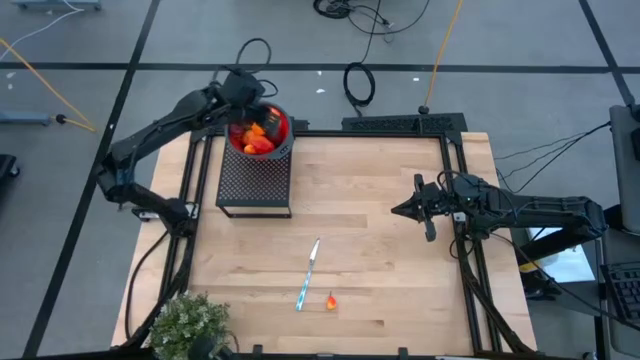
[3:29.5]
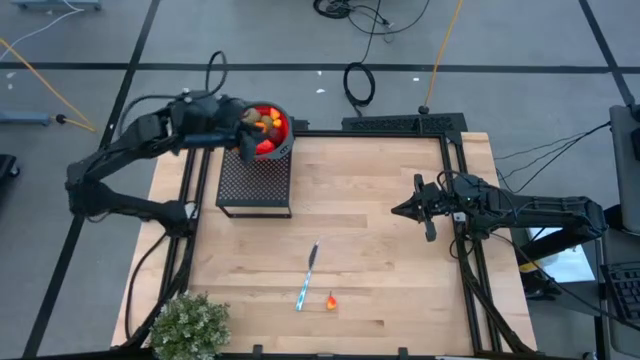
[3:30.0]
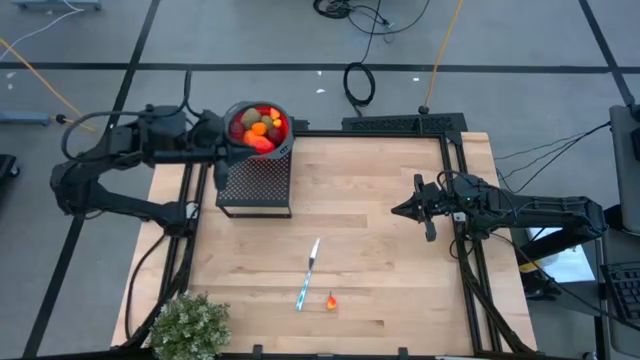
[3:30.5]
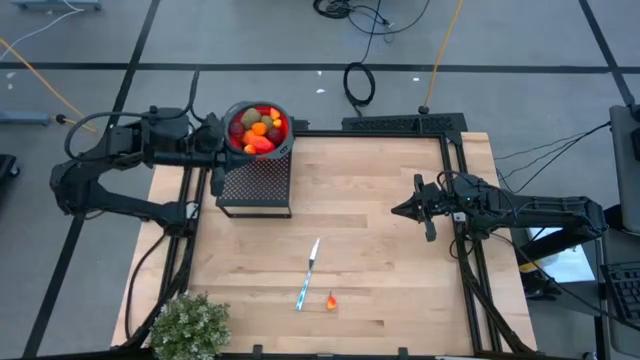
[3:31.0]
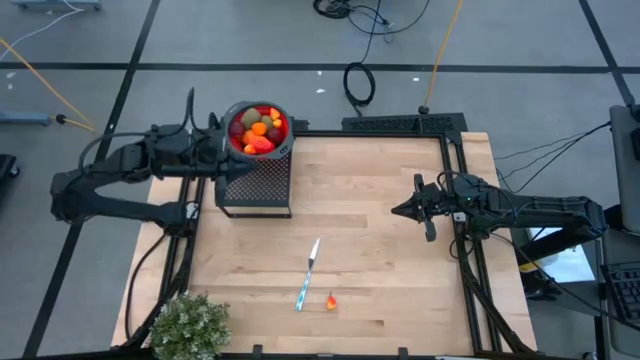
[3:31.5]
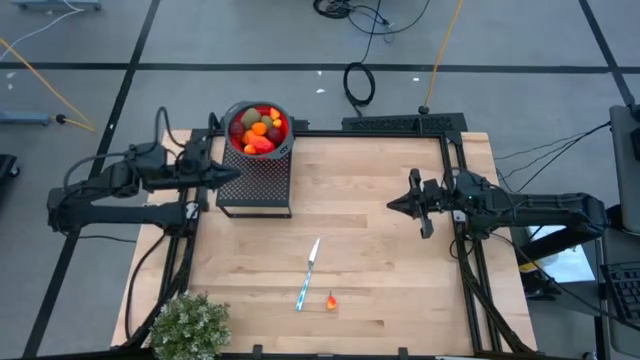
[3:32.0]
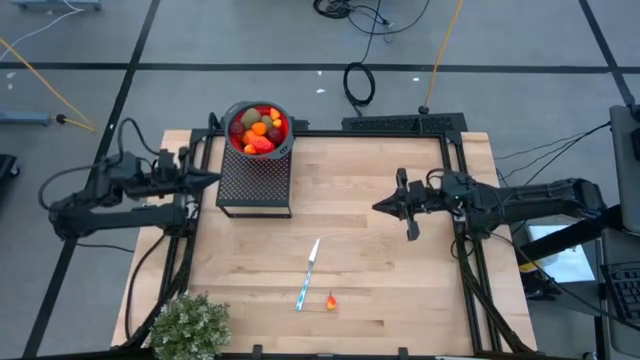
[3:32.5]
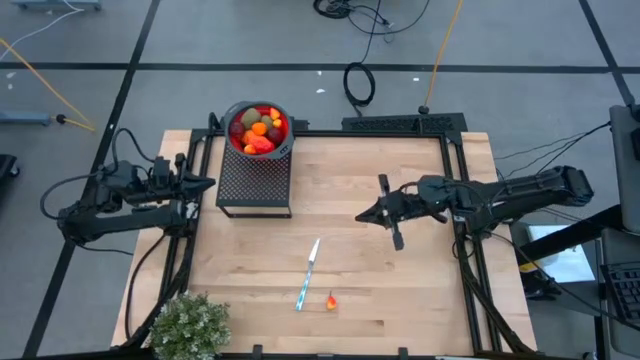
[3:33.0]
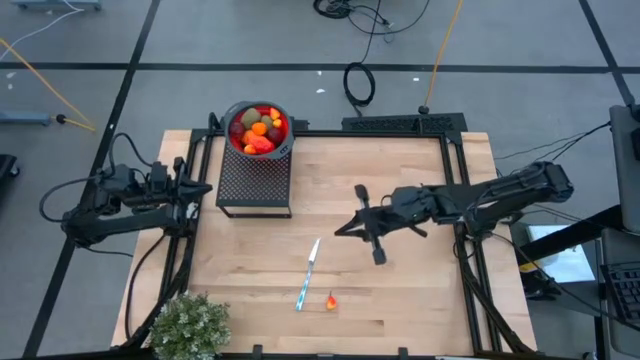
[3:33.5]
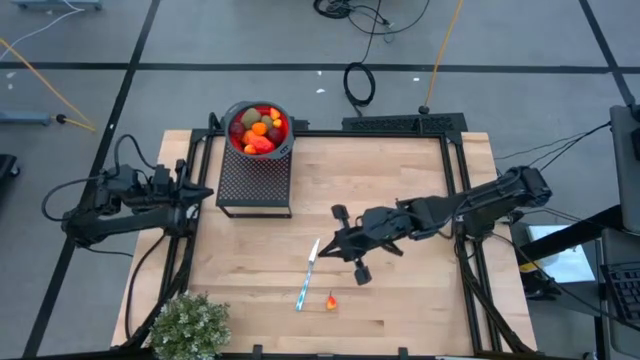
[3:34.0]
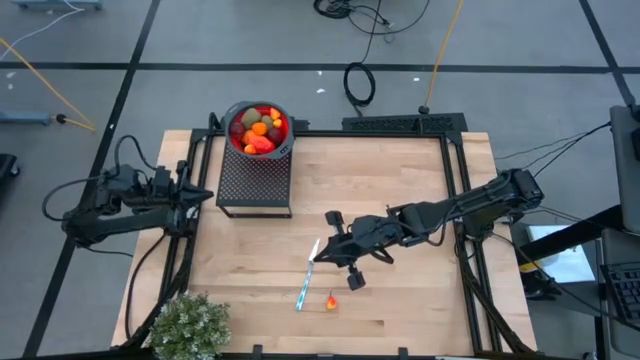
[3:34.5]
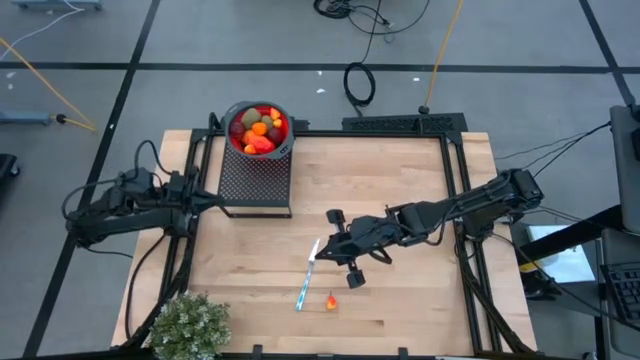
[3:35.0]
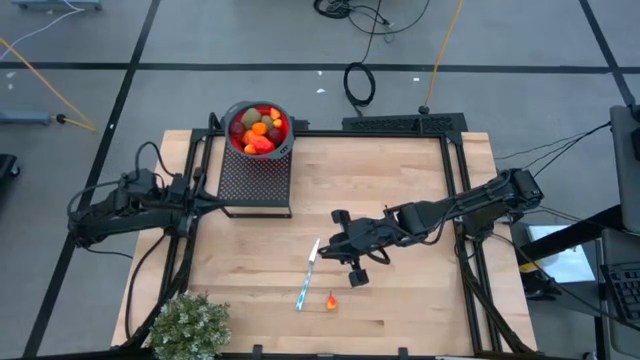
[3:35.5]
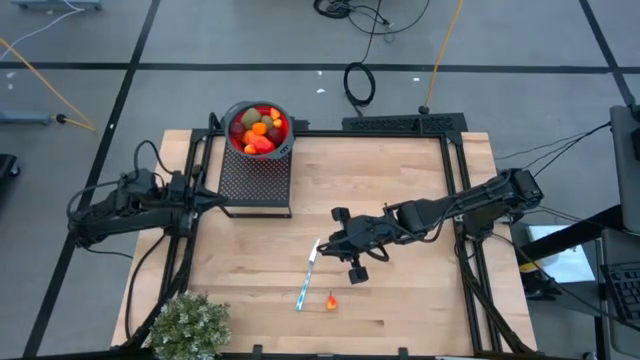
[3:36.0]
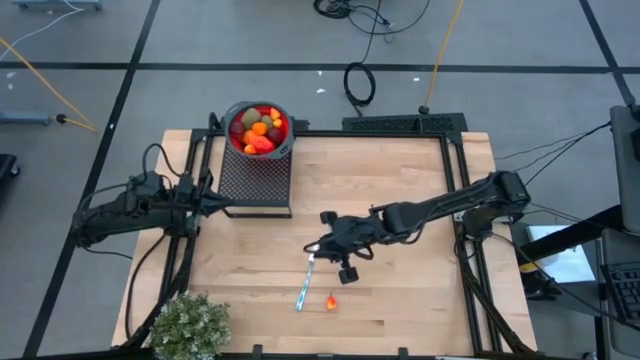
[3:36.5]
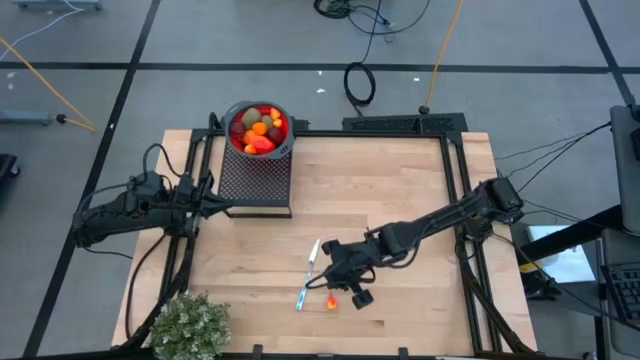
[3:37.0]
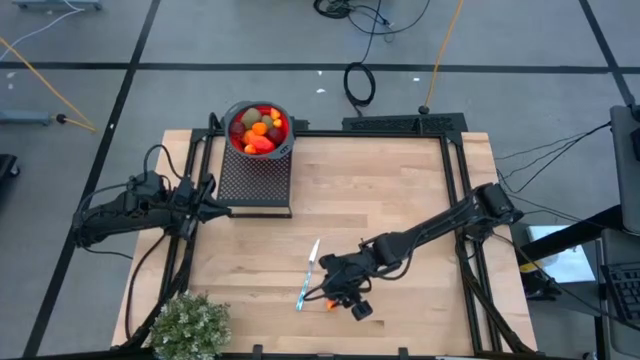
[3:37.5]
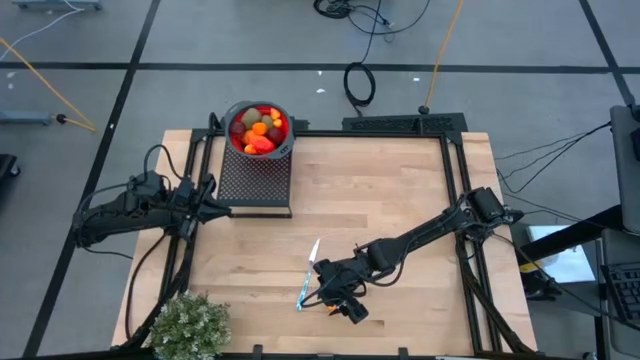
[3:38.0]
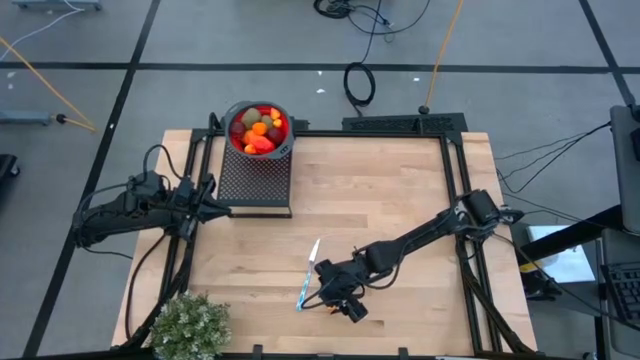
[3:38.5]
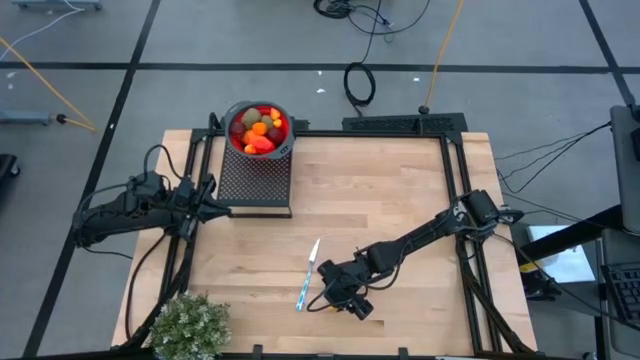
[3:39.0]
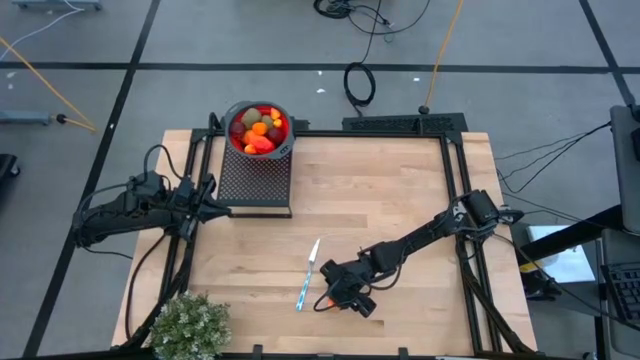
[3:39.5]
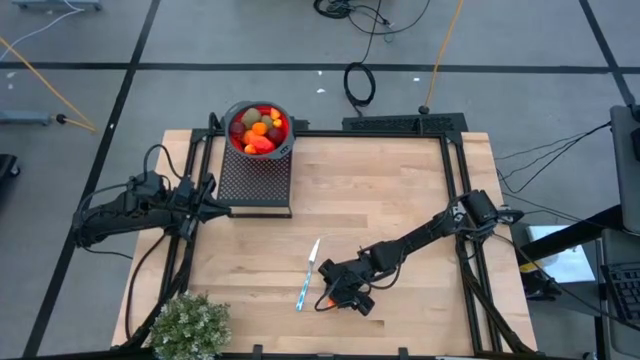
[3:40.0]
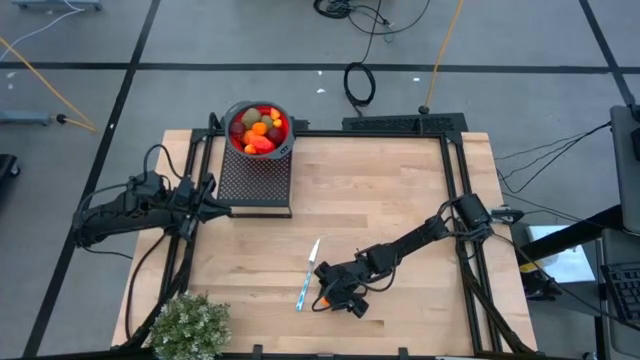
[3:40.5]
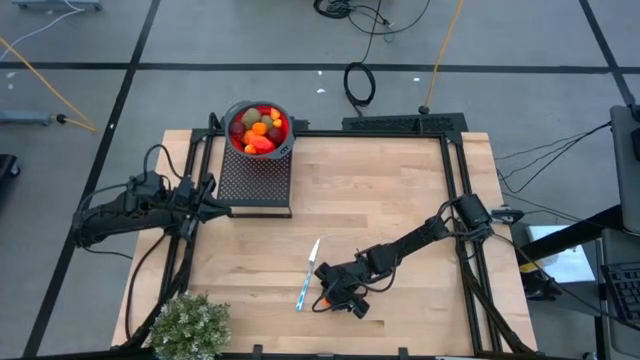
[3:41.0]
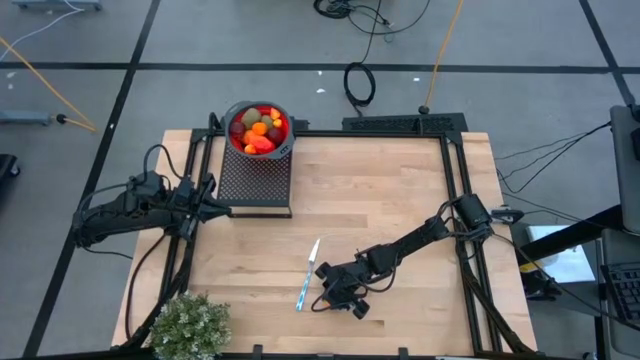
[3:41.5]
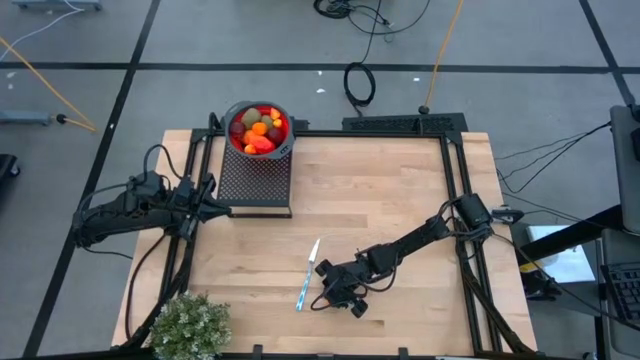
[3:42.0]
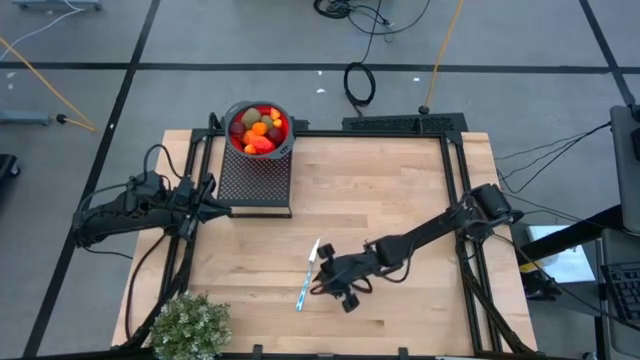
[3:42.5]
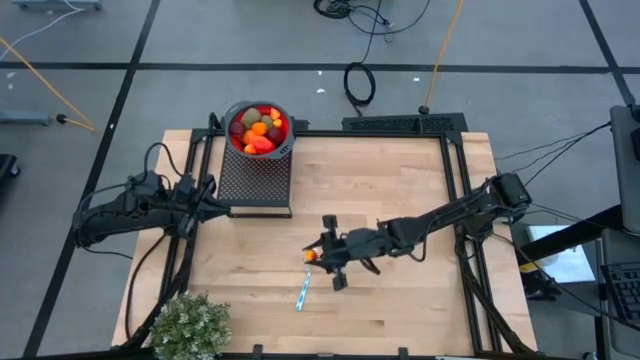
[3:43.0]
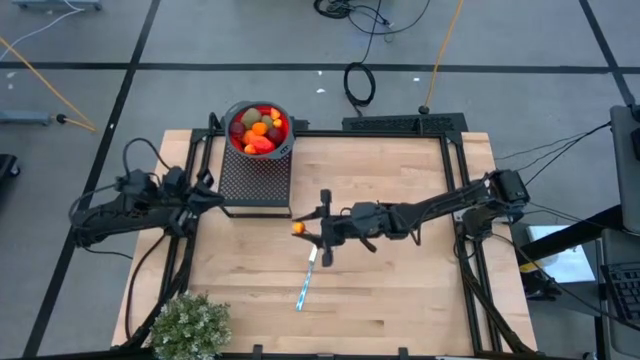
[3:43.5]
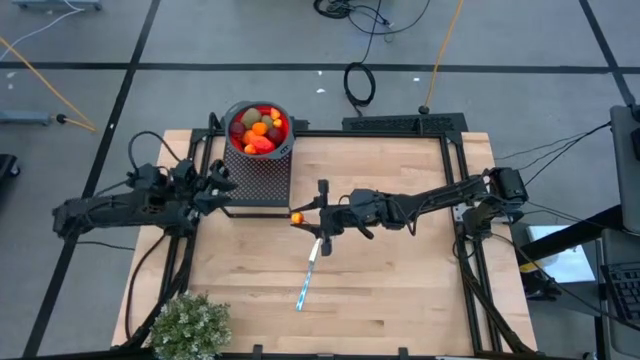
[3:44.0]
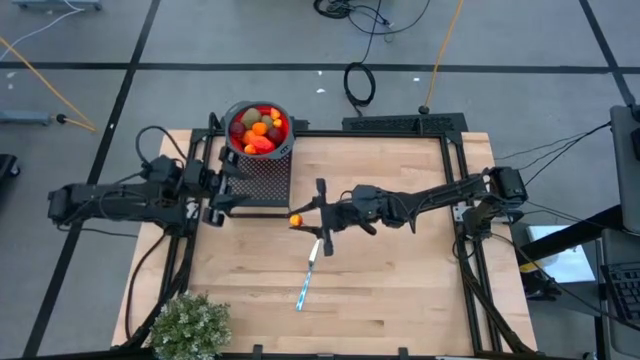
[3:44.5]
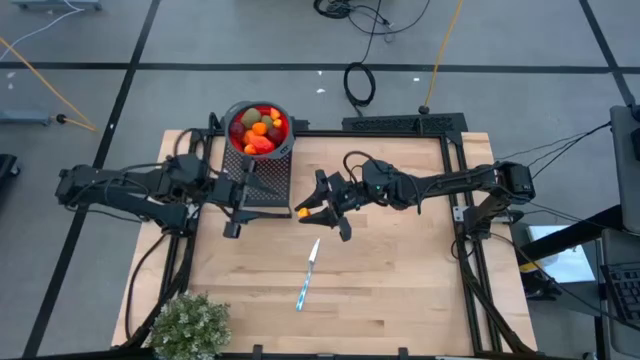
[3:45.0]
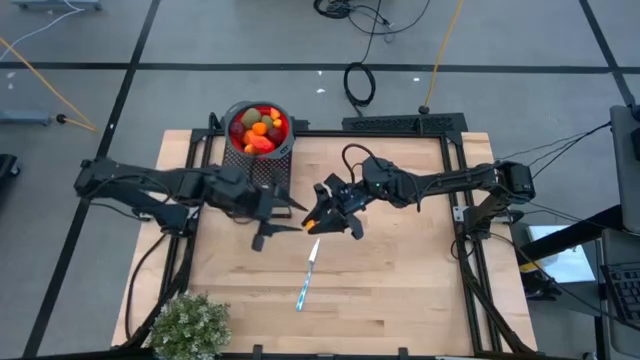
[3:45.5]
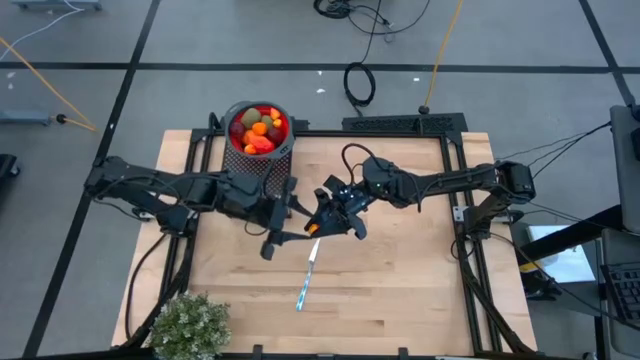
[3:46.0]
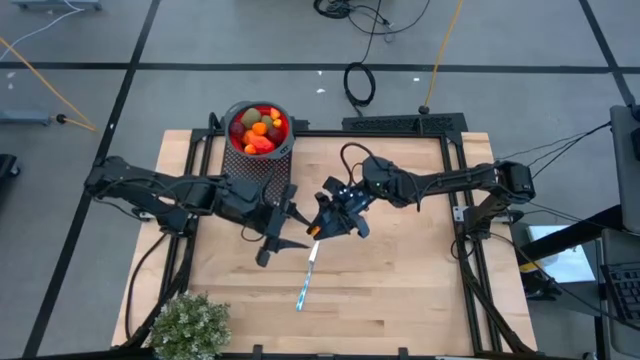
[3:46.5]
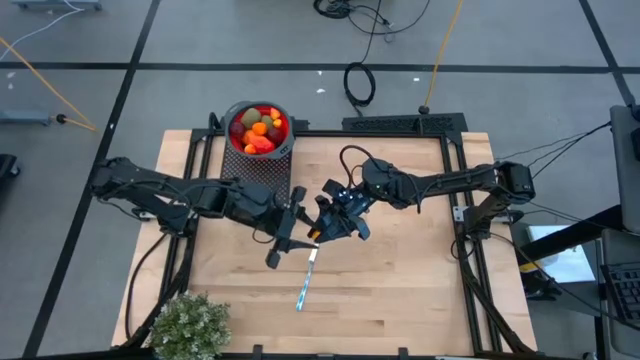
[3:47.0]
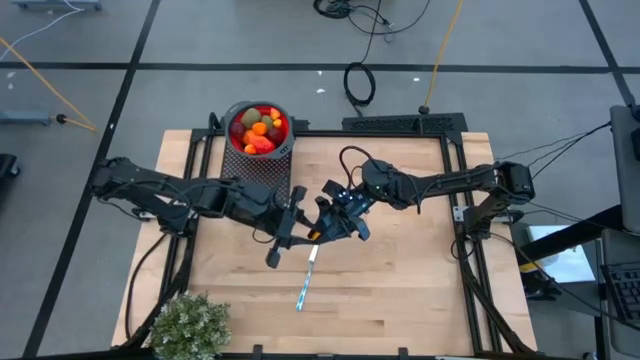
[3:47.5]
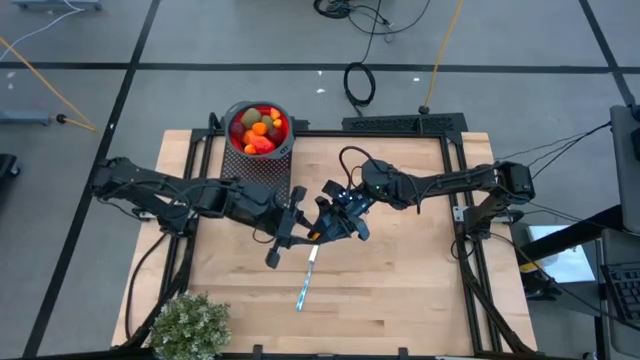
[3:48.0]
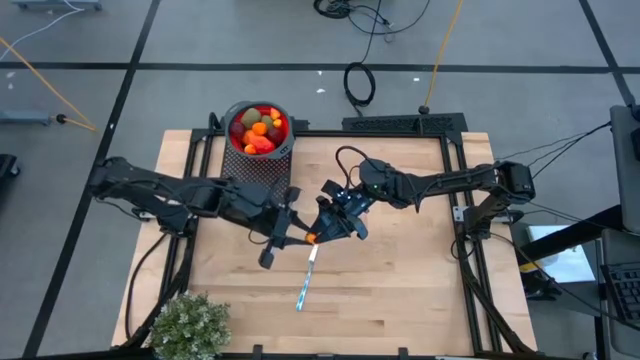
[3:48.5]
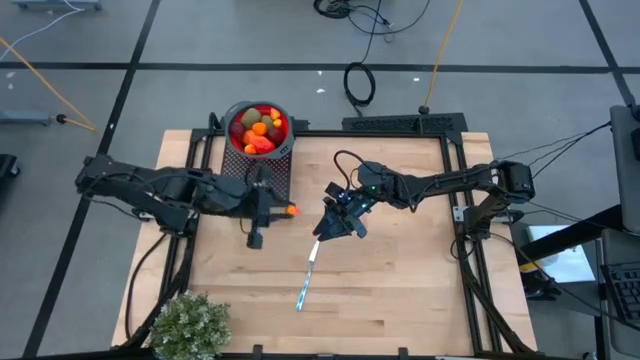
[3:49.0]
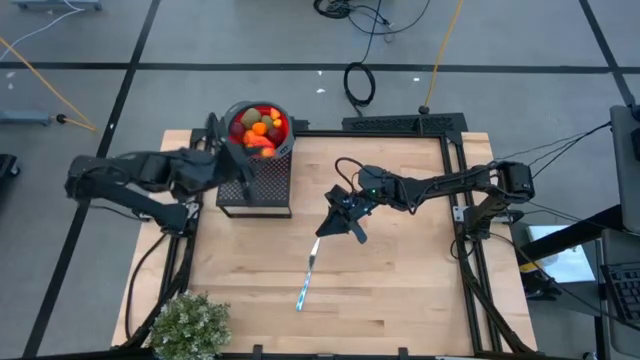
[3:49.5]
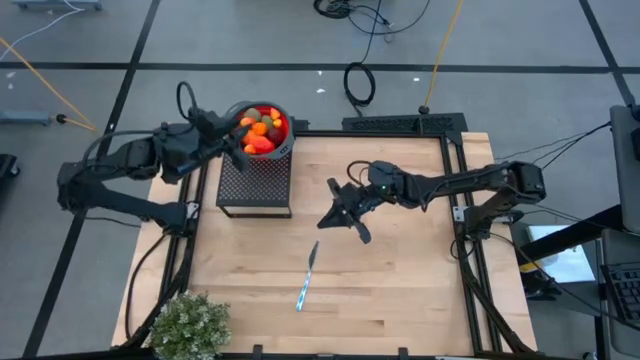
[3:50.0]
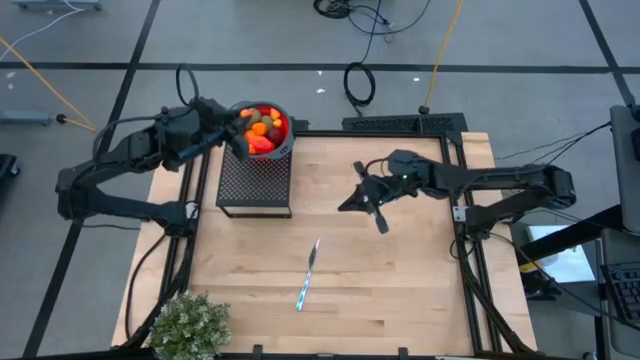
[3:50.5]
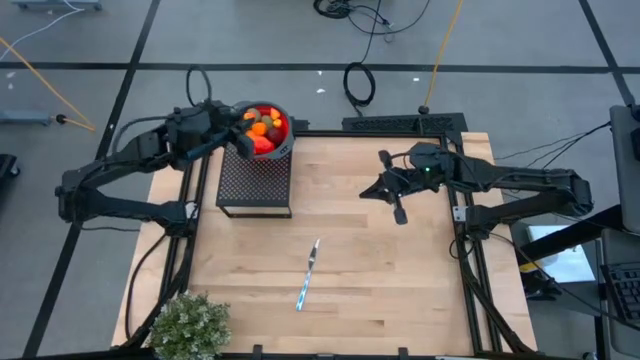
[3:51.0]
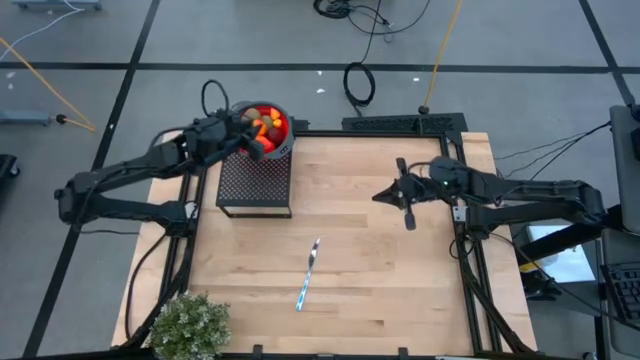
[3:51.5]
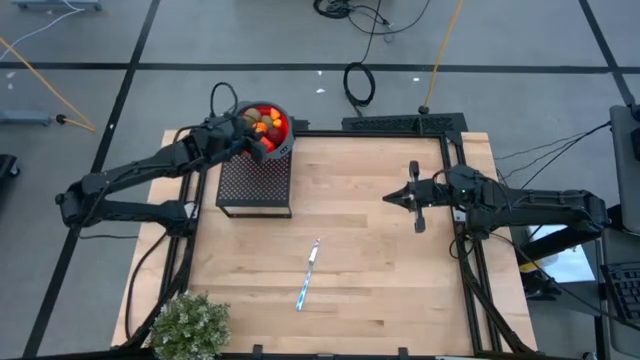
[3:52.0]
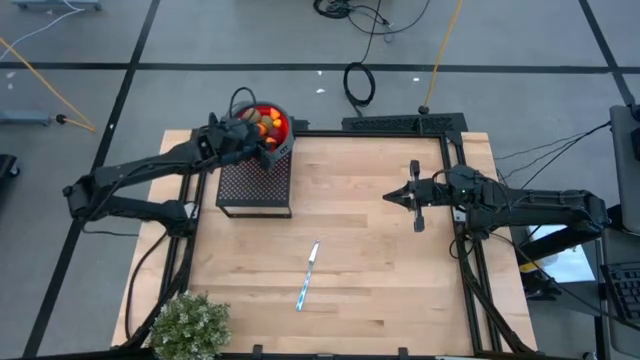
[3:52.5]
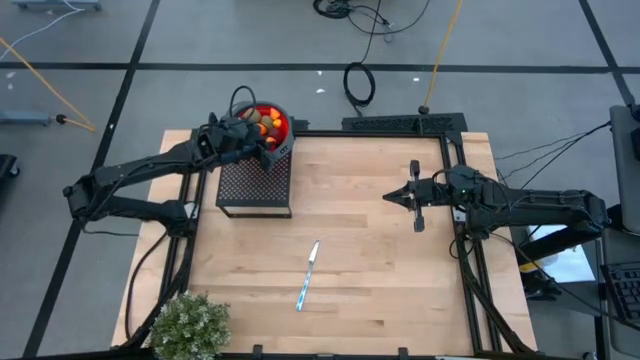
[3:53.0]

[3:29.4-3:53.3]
Task: Pick & Place Fruit
Put the orange pear into the red strainer bowl on the shelf
